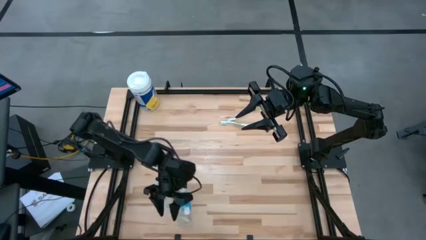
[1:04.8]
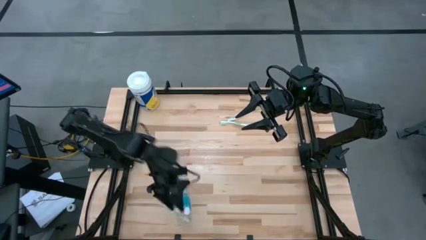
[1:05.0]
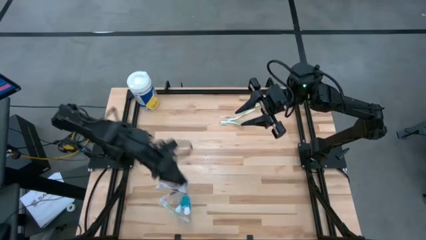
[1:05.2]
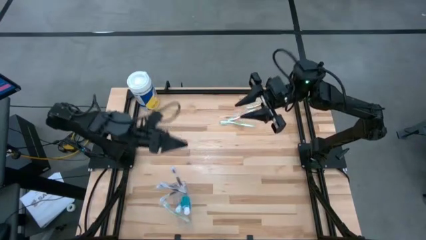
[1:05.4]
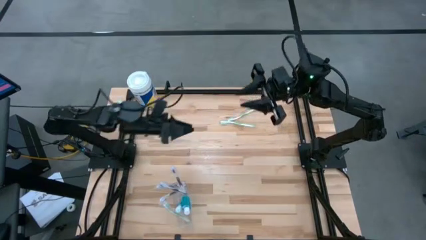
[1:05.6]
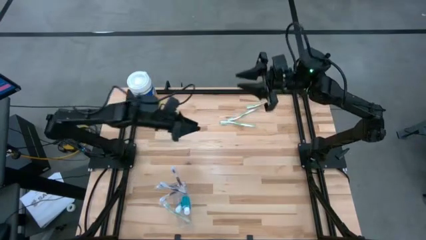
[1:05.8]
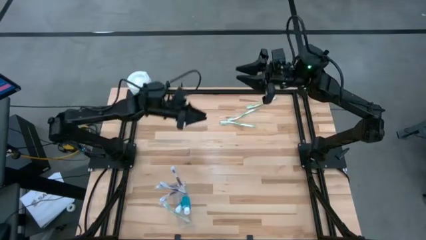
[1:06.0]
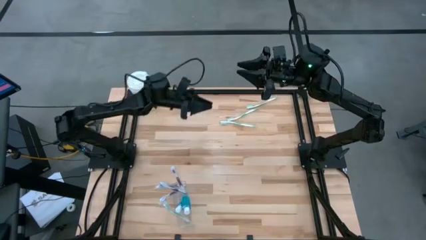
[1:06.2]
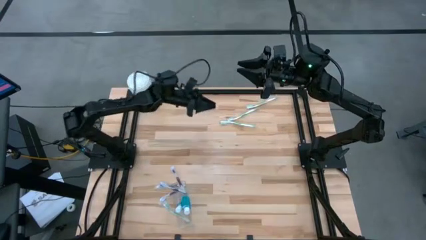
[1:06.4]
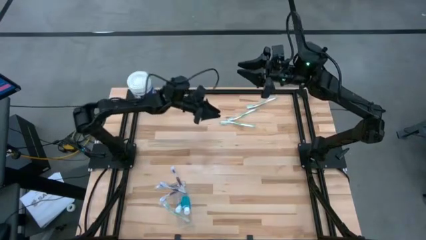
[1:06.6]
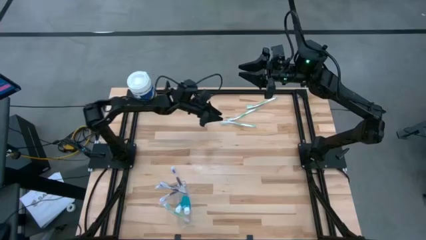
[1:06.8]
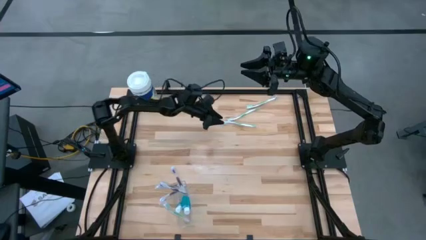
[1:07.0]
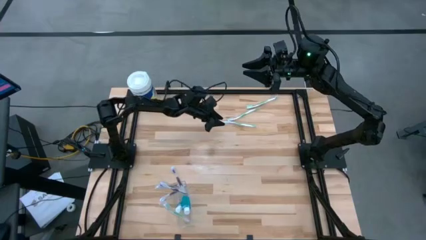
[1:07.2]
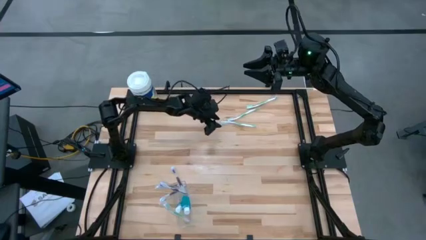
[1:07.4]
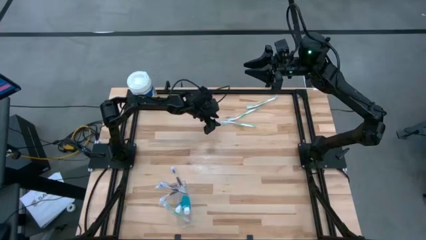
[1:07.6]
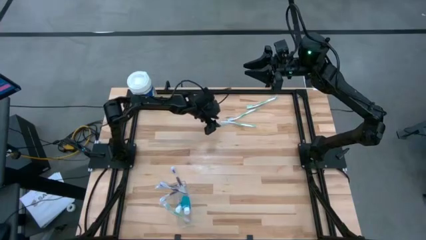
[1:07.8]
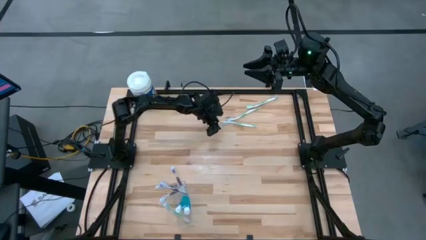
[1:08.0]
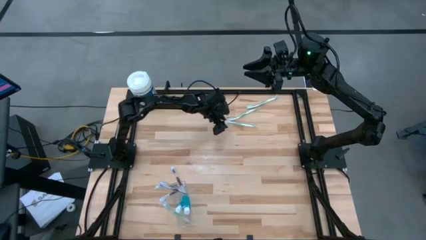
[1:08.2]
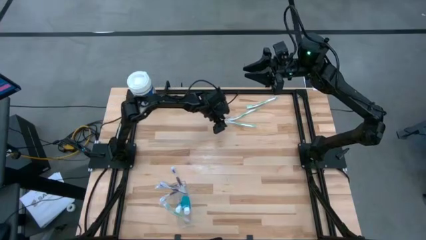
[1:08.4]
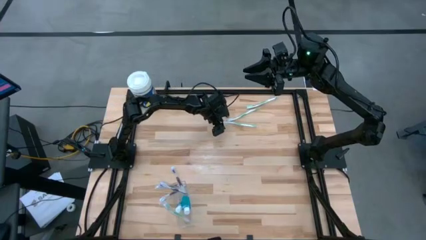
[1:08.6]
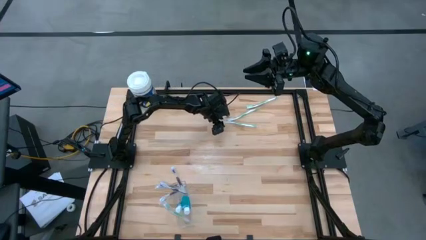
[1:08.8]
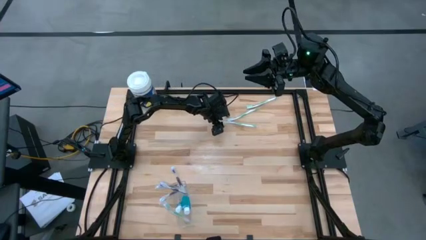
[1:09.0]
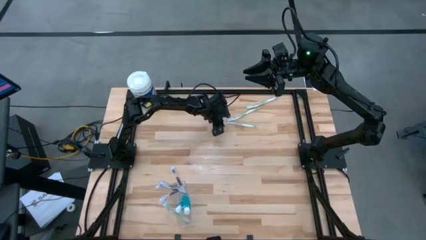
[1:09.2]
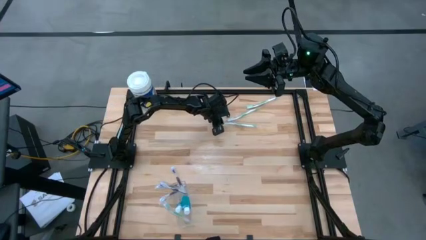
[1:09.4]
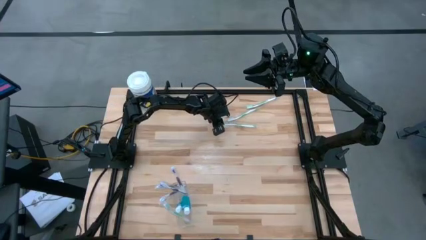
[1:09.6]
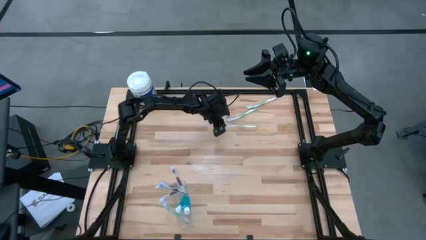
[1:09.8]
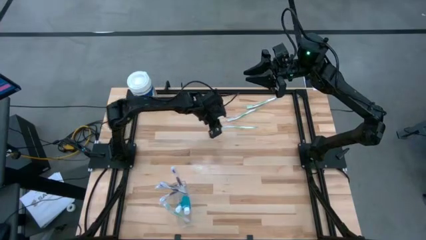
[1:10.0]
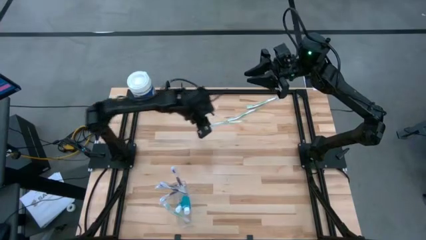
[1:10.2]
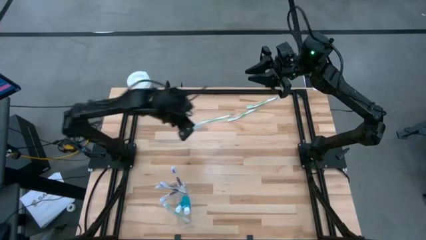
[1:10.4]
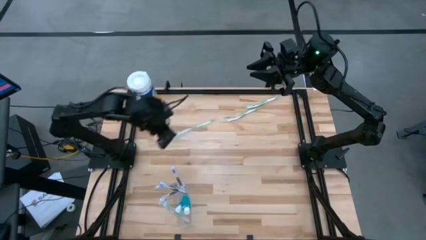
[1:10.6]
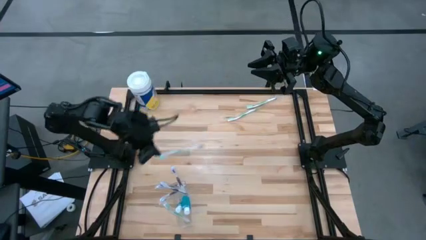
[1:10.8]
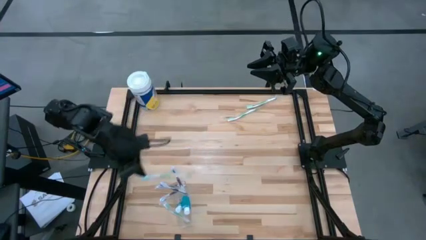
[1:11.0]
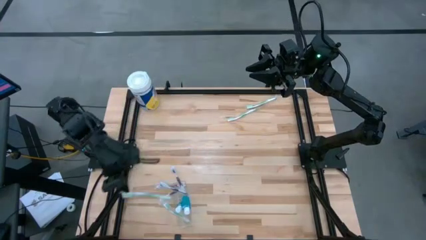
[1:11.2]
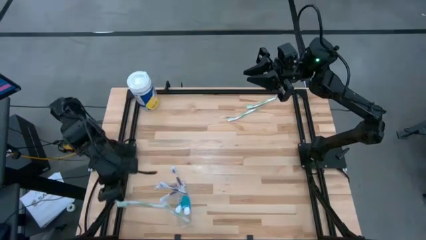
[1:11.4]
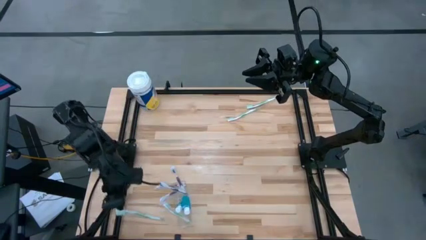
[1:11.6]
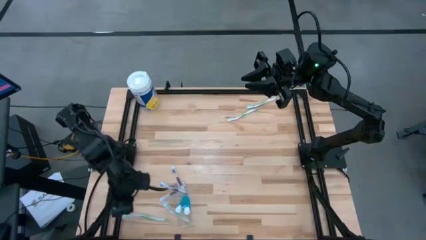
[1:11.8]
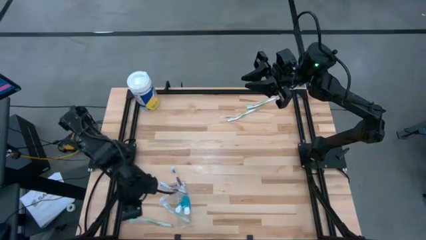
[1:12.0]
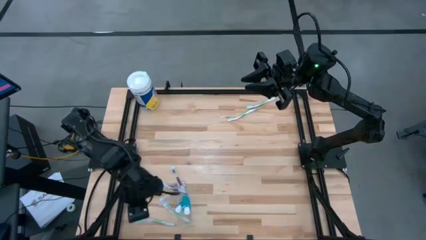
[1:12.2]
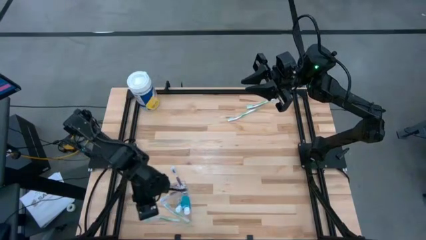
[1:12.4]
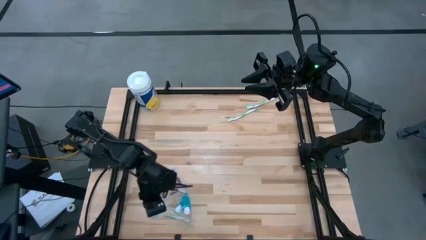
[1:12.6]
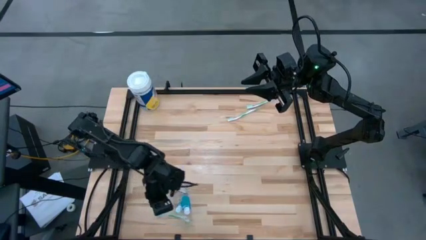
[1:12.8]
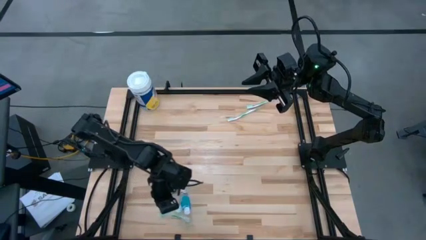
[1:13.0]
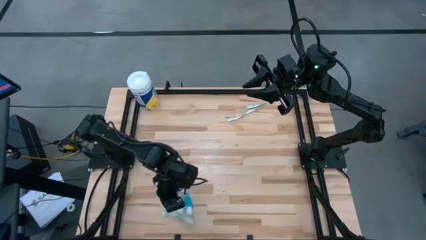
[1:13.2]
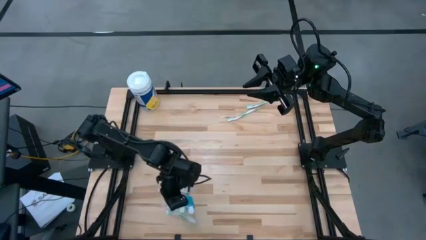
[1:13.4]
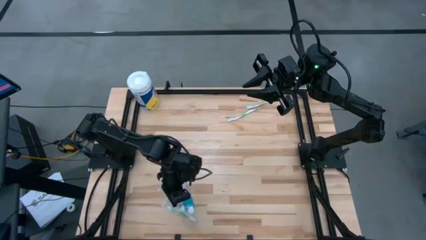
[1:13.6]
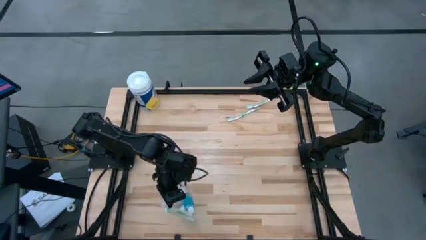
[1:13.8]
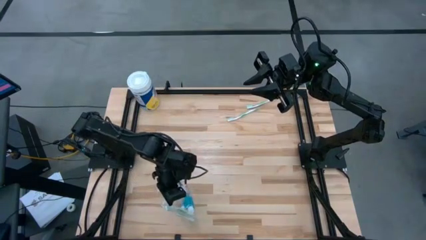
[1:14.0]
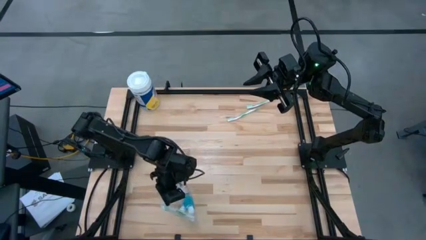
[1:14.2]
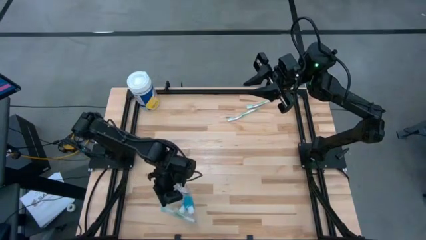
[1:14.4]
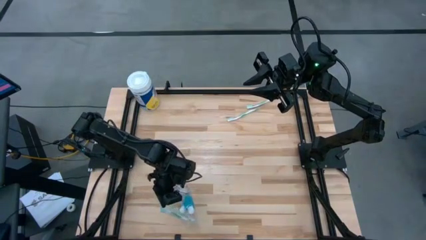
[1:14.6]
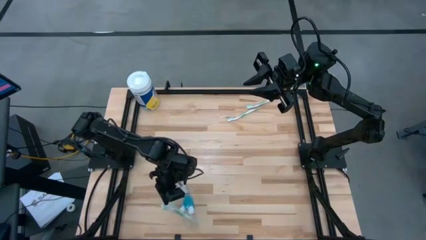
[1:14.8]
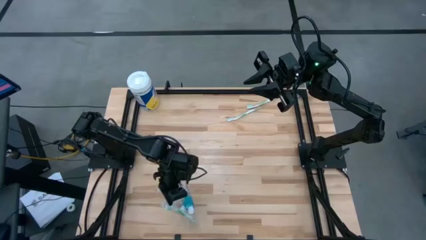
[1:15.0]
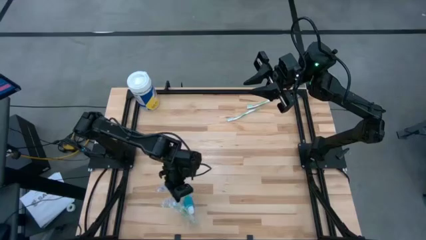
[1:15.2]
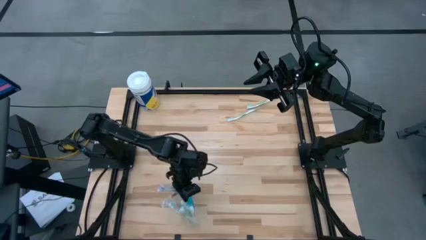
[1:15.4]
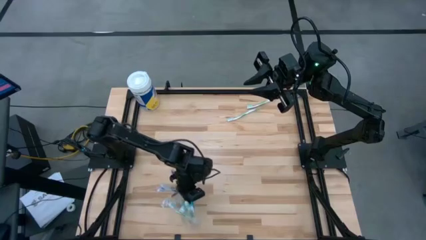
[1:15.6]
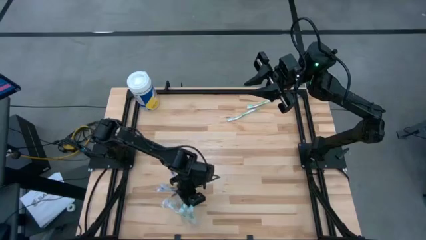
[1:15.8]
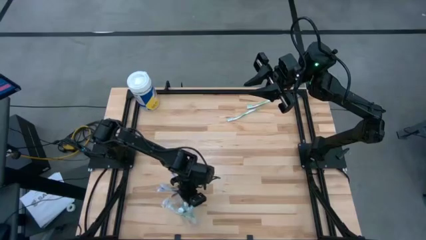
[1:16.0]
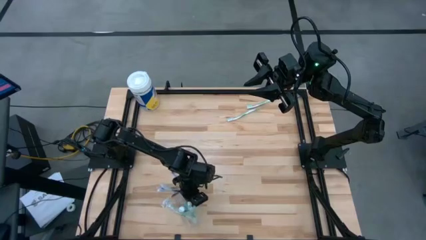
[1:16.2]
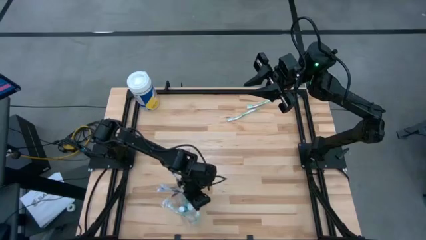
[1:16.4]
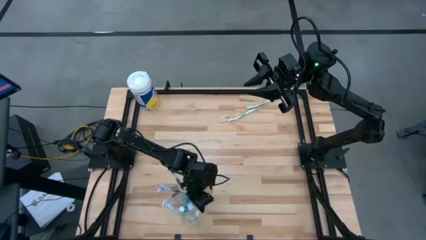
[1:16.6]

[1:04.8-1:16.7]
Task: Pick & Place toothbrushing station
Put the green toothbrush into the transparent organizer

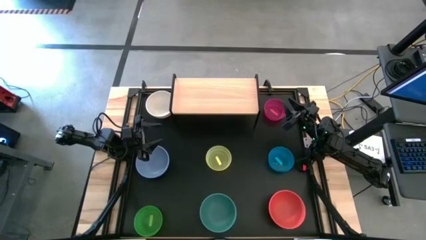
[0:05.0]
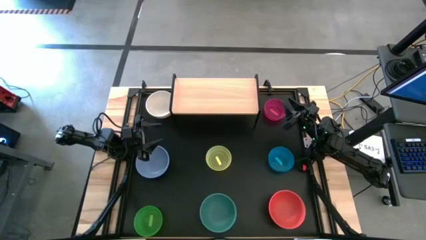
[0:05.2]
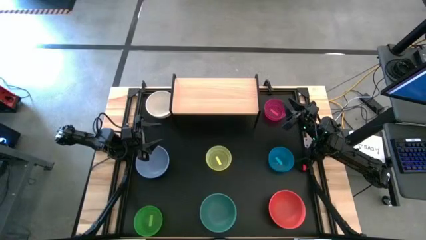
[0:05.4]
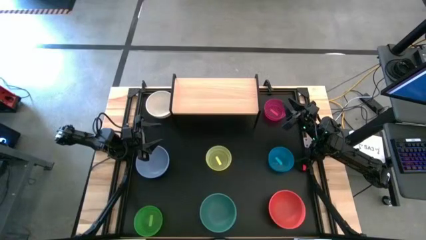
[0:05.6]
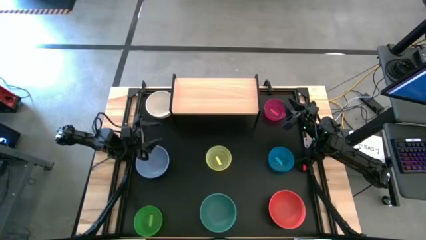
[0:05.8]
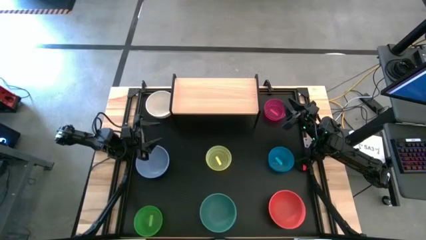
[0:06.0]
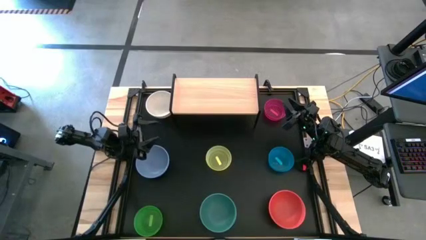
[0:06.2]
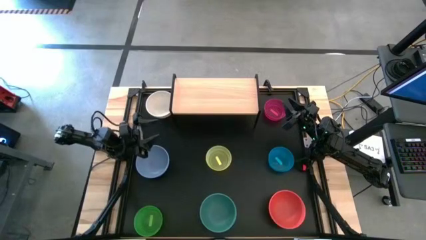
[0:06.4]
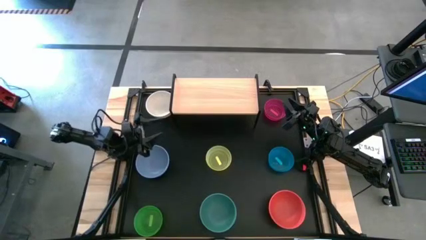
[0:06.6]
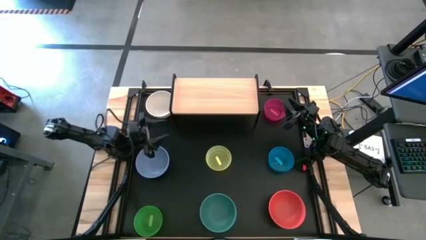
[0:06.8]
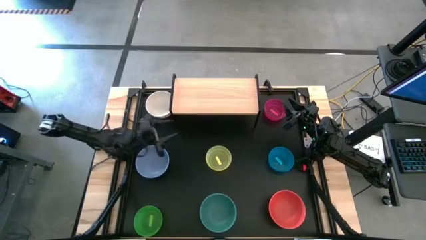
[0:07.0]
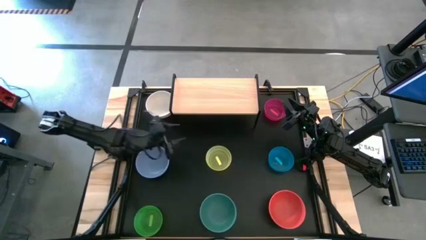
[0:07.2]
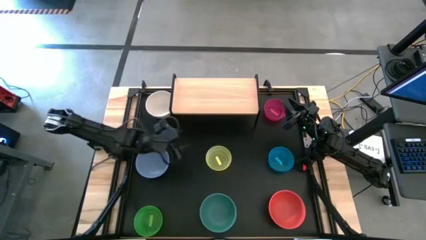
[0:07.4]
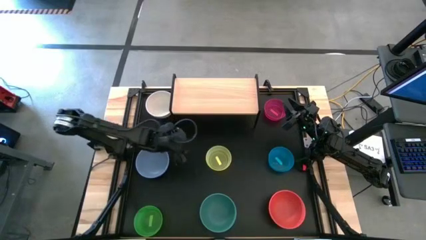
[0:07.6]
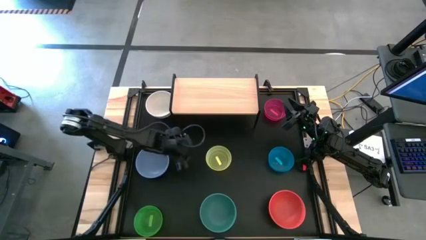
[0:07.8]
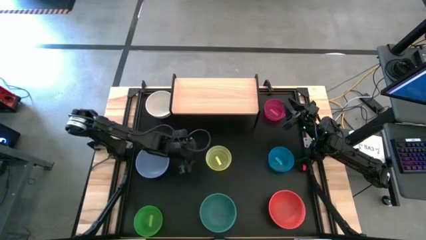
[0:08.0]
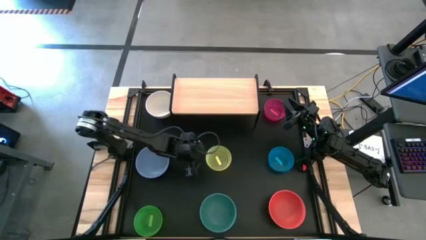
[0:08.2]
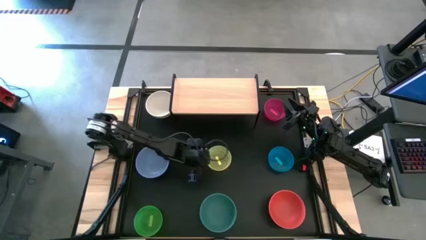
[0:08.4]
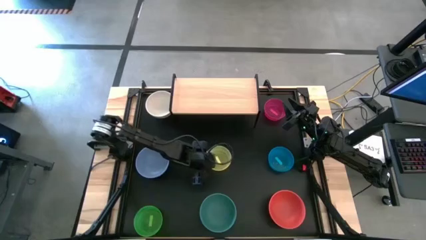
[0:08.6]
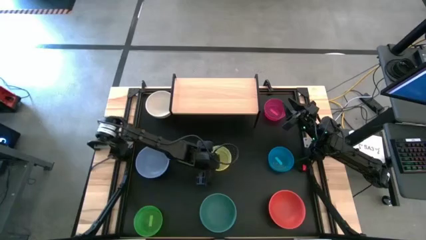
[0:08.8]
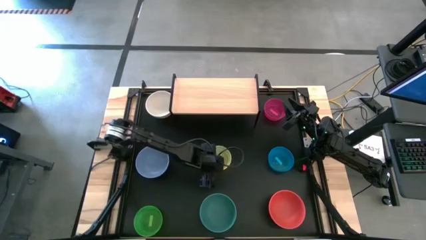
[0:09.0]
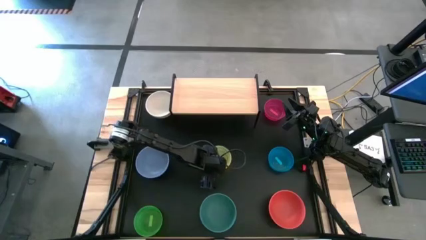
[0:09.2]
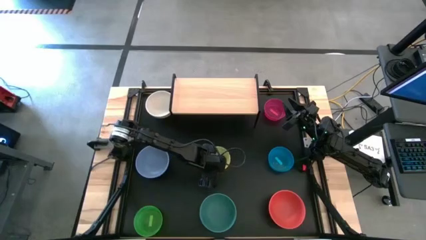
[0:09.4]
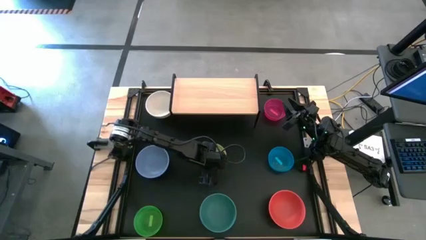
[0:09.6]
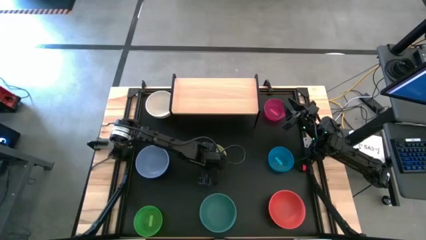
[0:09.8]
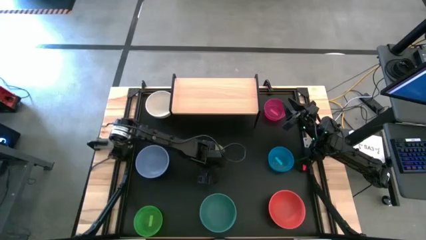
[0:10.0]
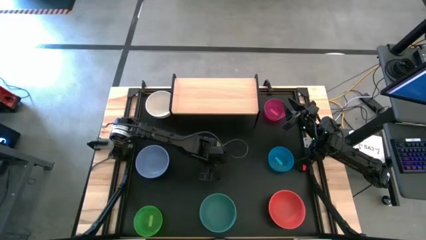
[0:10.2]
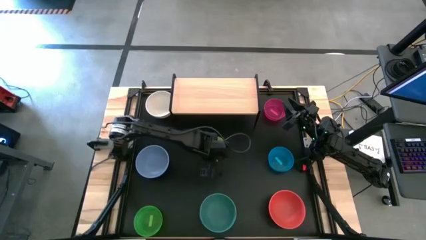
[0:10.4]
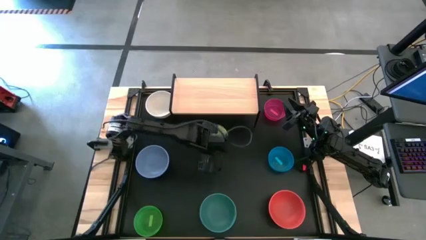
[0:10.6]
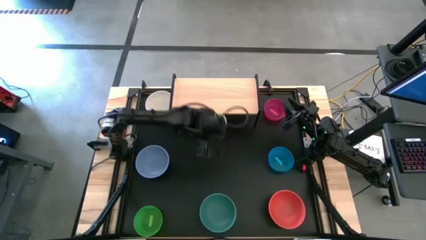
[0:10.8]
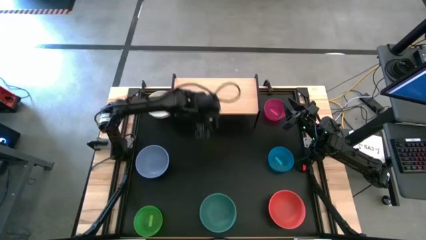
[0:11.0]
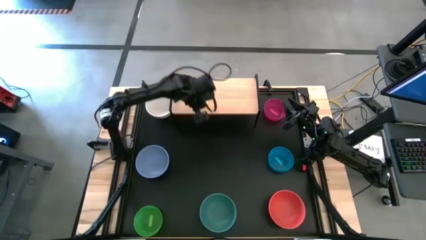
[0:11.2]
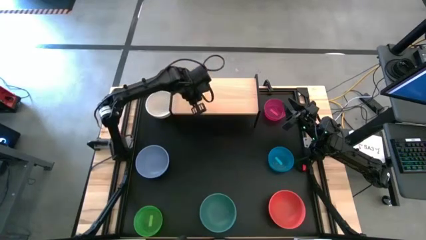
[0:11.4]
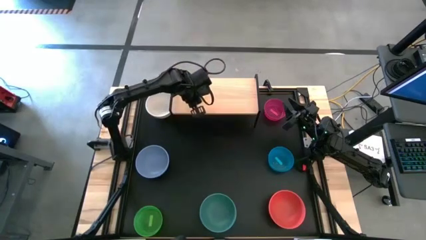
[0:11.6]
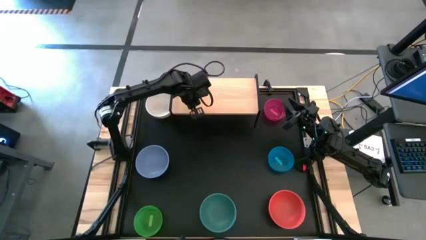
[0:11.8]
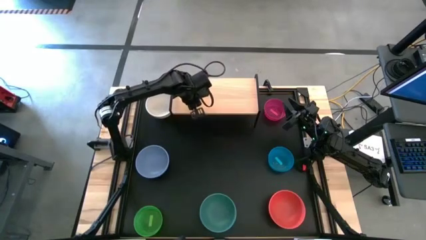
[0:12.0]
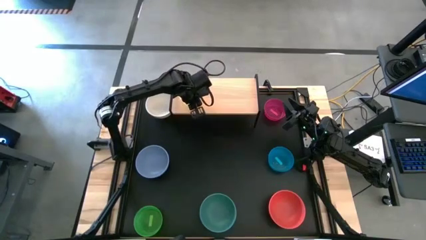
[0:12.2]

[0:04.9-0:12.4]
Task: Place and stack bowls onto a shelf
Put the small yellow bowl on the shelf
